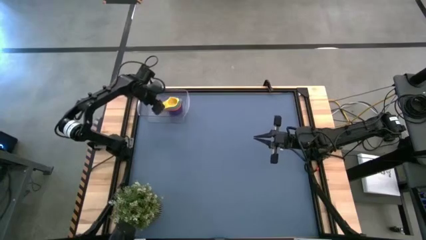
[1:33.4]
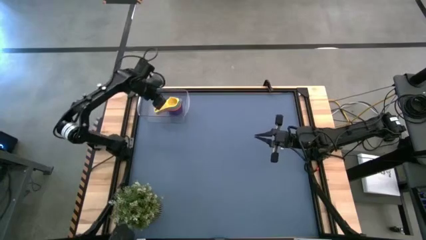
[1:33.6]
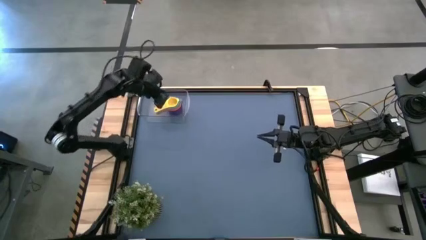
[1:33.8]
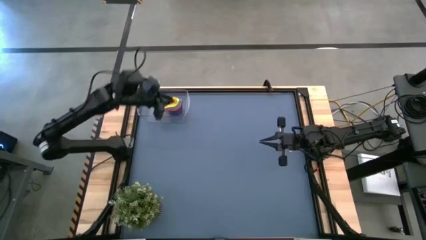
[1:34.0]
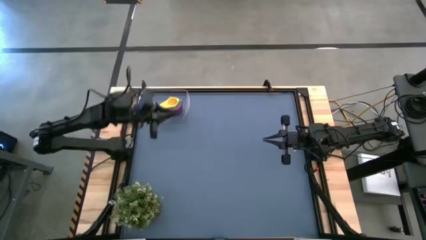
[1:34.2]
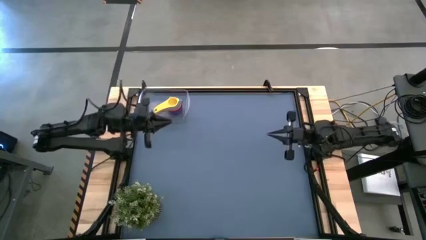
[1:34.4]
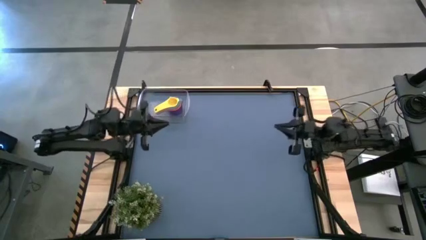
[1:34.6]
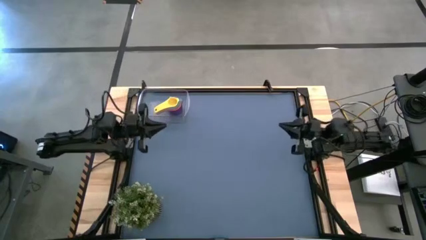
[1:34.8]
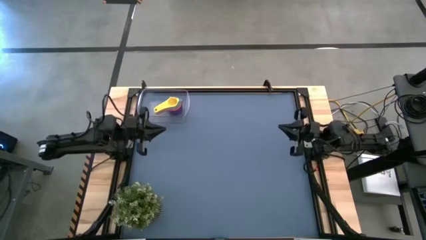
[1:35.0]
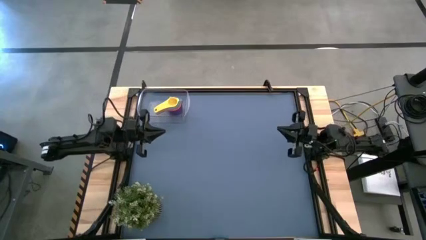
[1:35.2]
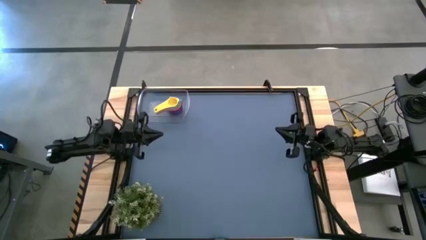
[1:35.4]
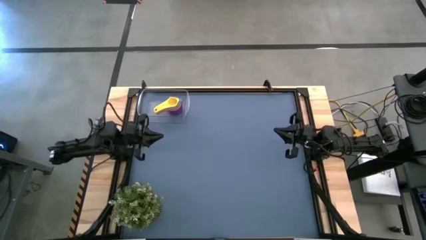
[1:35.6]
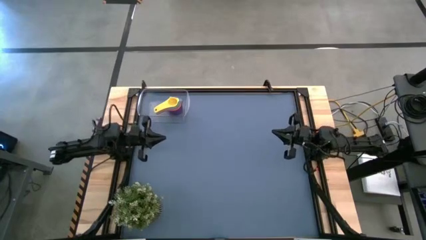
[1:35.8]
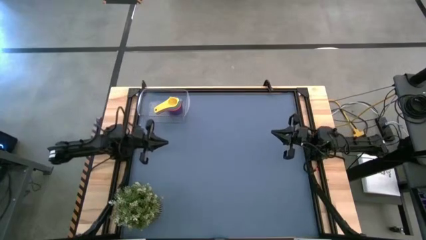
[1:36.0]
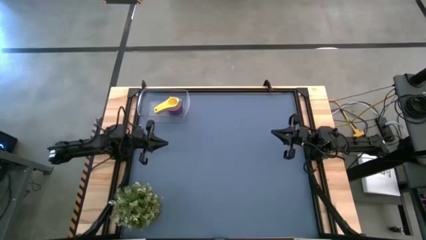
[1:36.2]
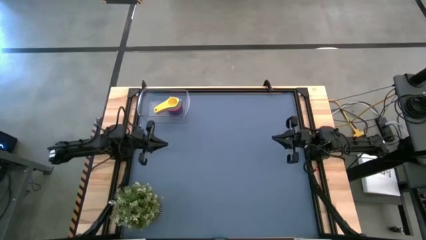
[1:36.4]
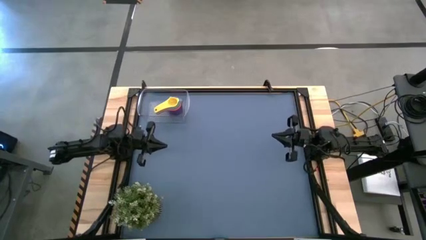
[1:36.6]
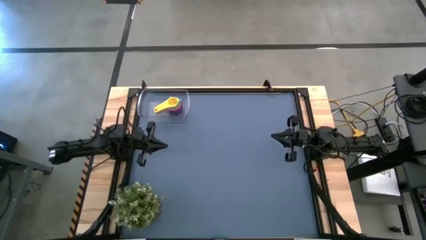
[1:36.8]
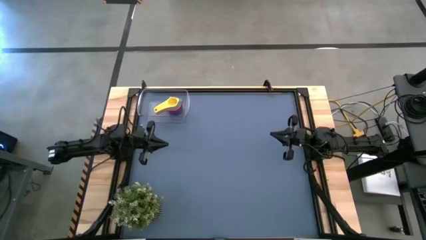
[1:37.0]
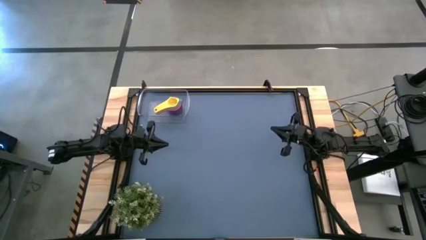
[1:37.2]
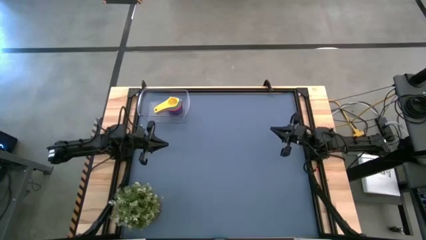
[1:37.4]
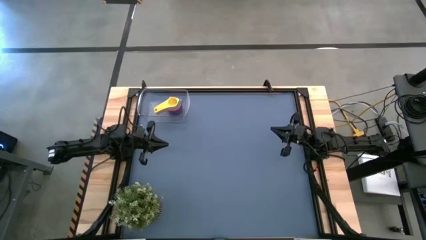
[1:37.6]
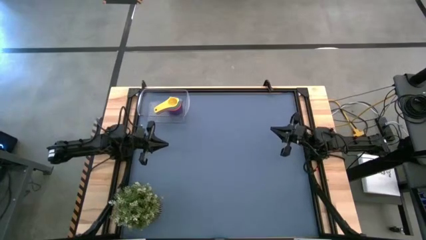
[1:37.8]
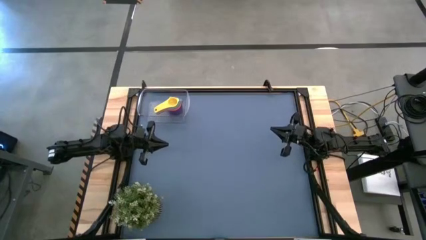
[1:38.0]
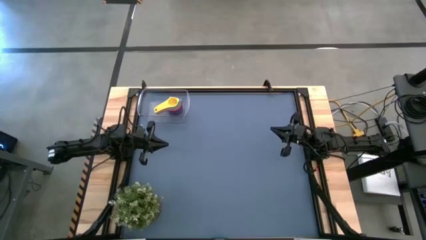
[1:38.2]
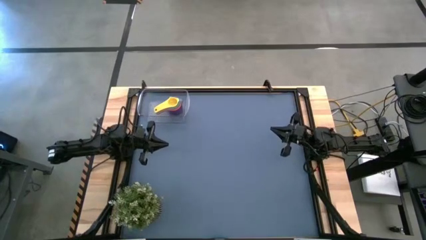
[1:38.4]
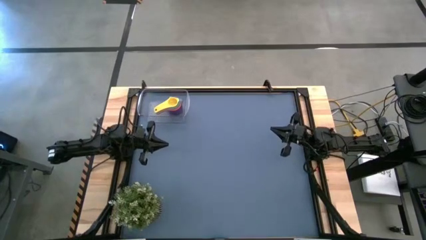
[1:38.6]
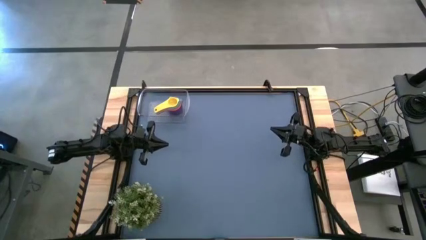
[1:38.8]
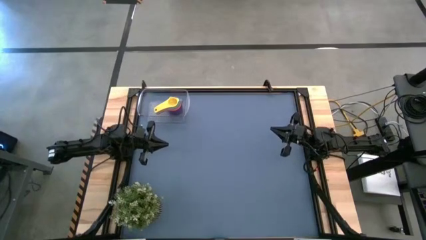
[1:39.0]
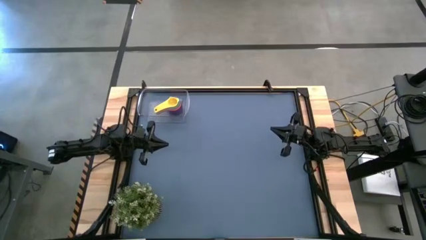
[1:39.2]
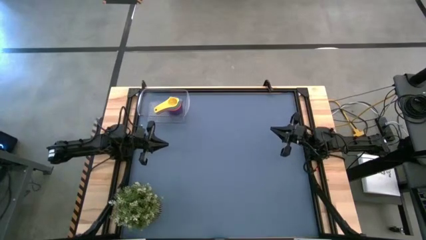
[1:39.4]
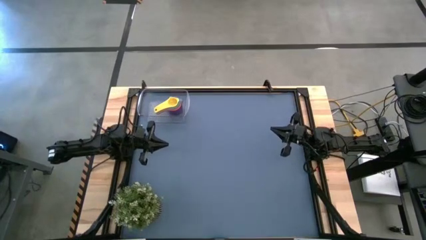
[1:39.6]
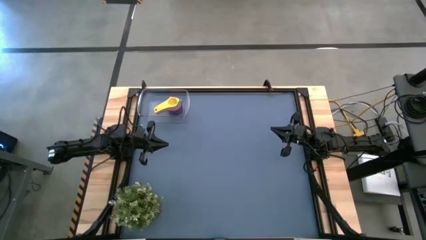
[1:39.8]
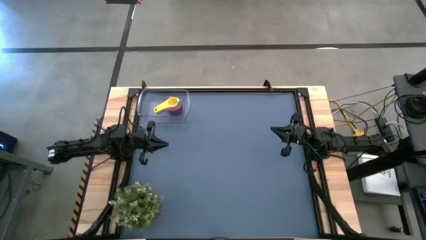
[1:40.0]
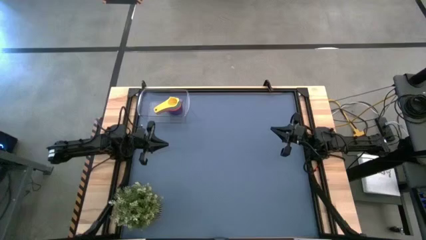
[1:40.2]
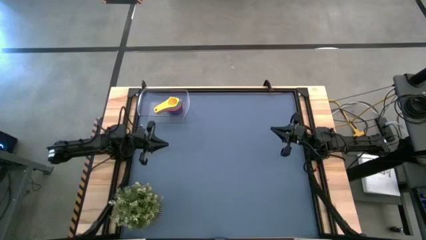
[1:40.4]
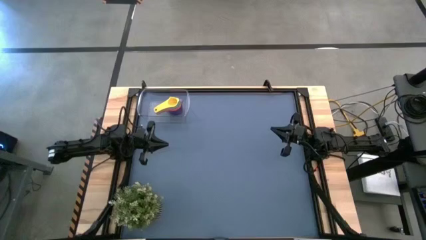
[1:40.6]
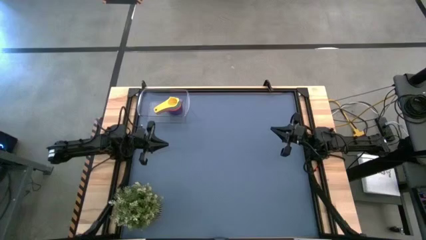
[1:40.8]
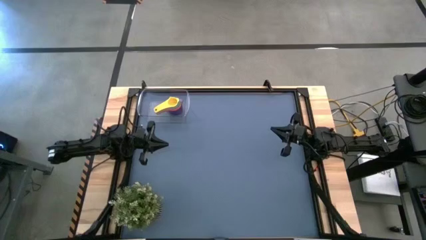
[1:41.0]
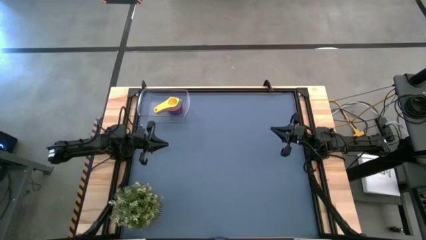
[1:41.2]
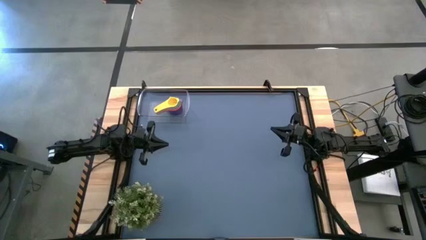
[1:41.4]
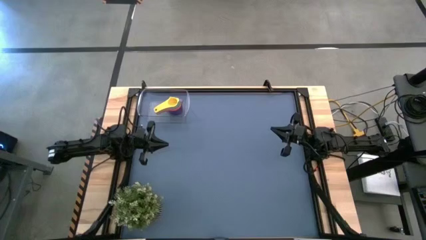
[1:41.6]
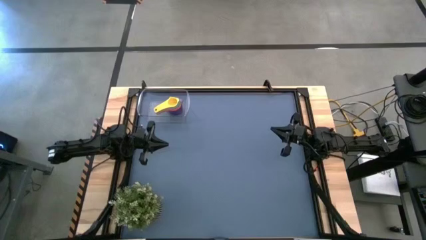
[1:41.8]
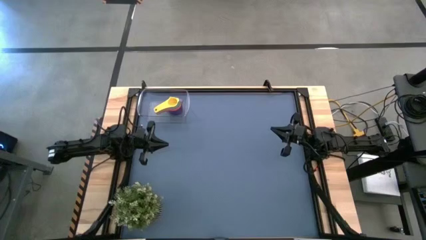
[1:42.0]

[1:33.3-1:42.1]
Task: Nest measuring cups in basket
Return to Home Position

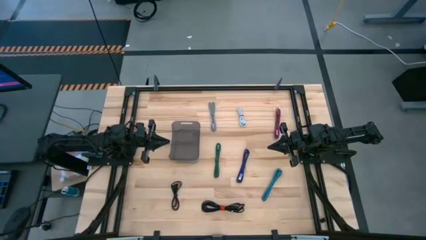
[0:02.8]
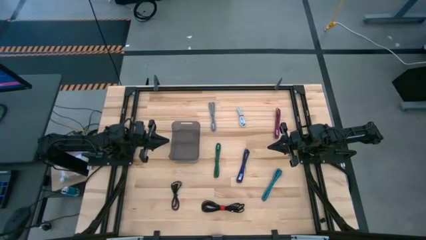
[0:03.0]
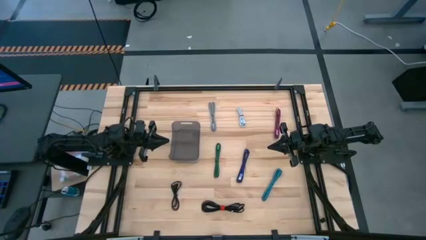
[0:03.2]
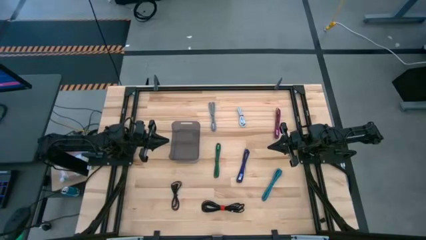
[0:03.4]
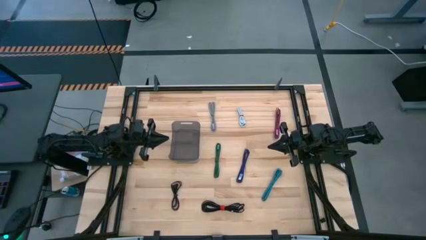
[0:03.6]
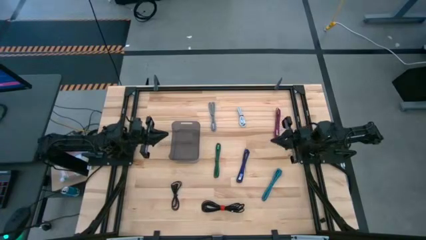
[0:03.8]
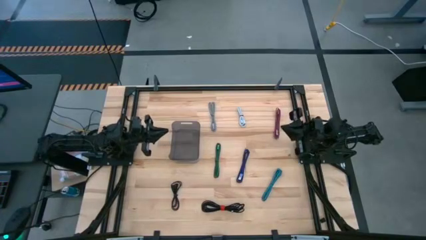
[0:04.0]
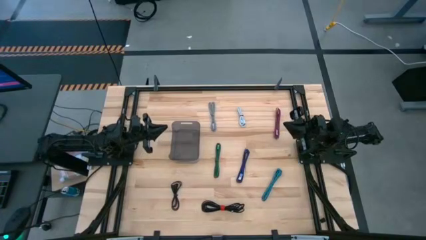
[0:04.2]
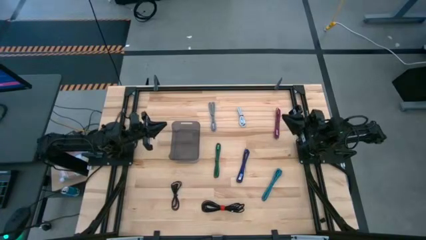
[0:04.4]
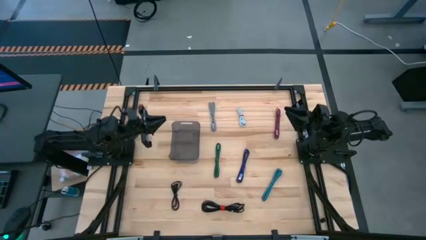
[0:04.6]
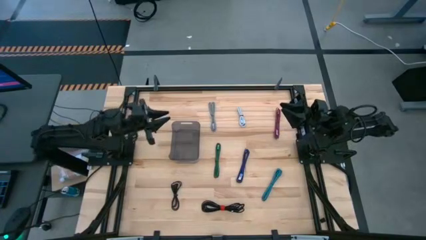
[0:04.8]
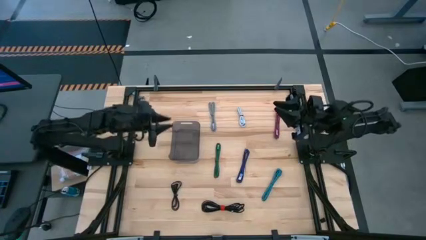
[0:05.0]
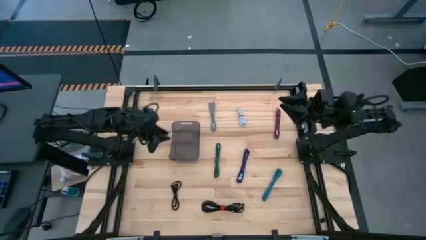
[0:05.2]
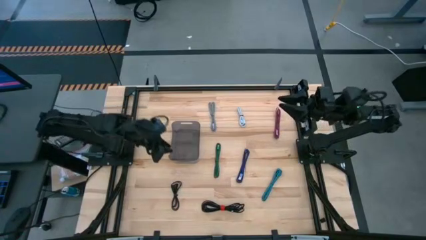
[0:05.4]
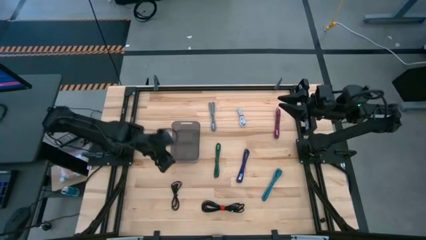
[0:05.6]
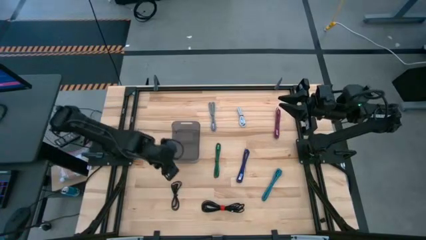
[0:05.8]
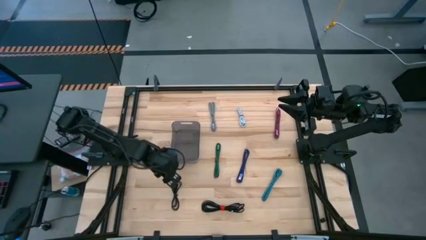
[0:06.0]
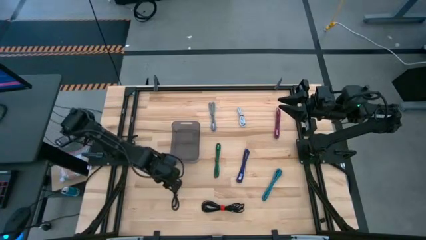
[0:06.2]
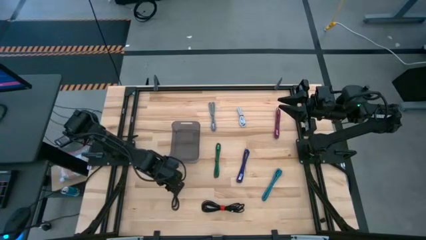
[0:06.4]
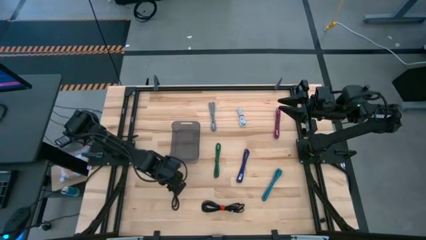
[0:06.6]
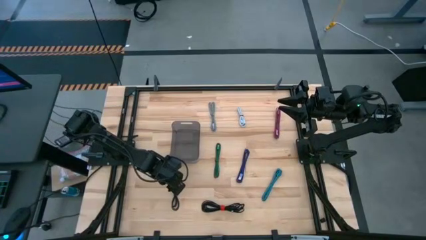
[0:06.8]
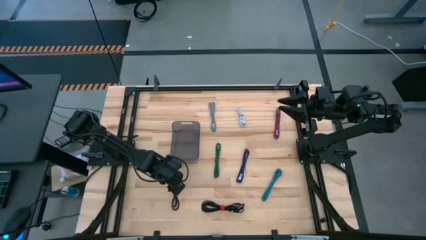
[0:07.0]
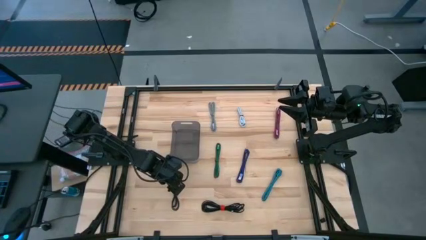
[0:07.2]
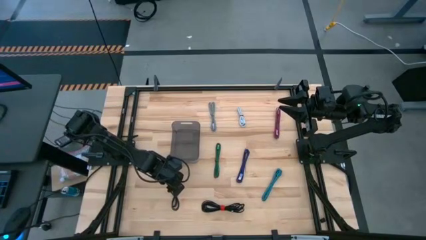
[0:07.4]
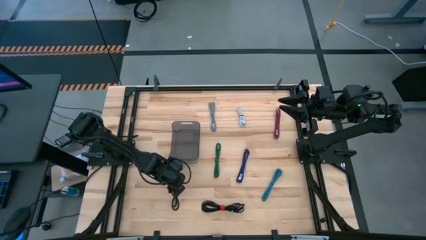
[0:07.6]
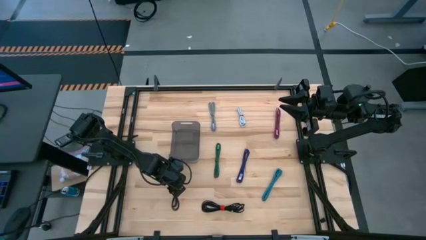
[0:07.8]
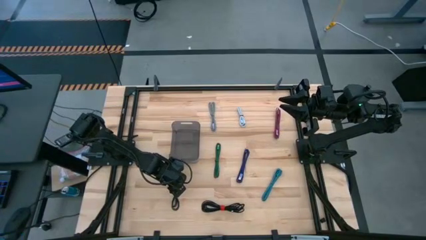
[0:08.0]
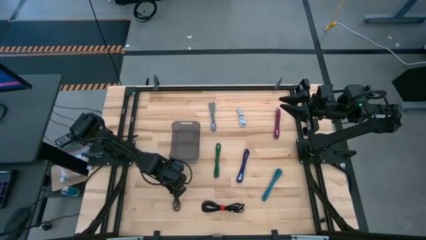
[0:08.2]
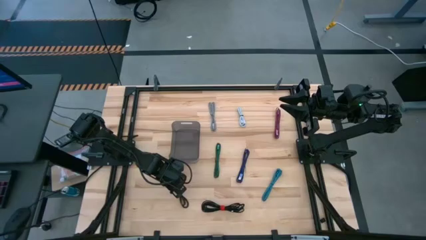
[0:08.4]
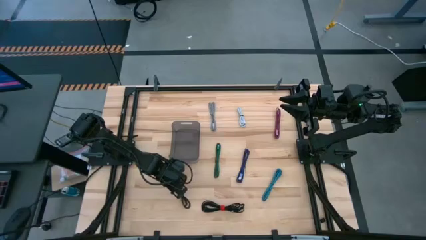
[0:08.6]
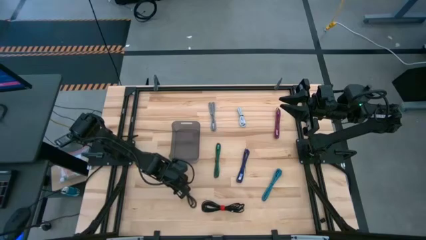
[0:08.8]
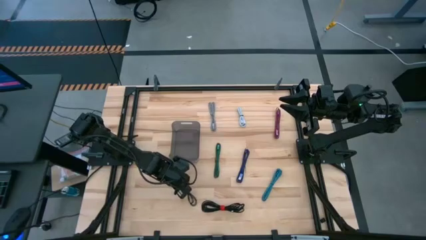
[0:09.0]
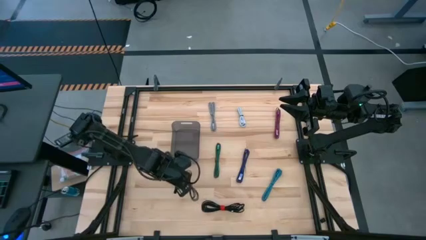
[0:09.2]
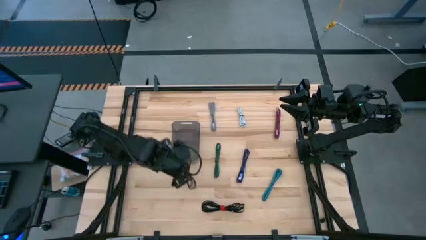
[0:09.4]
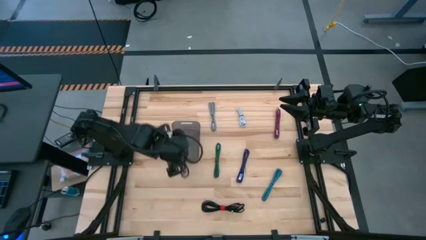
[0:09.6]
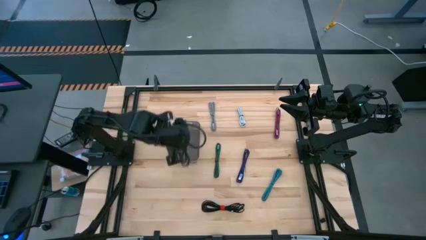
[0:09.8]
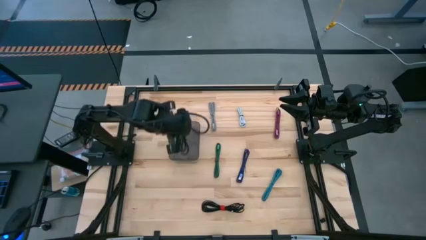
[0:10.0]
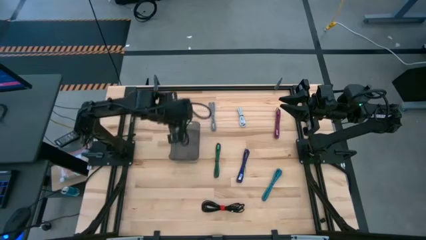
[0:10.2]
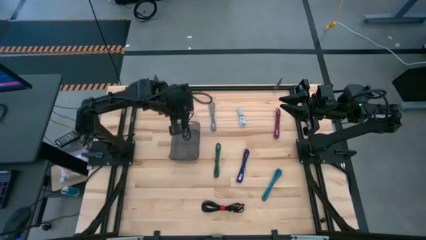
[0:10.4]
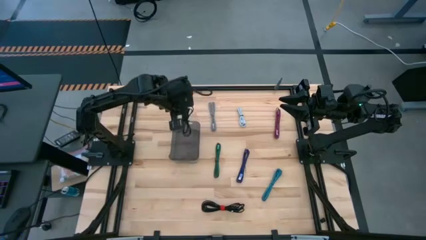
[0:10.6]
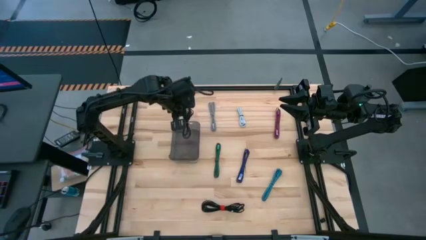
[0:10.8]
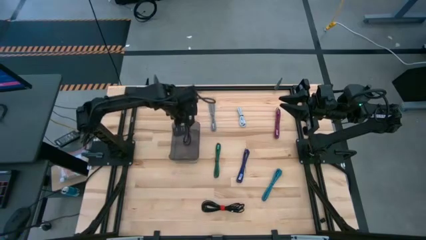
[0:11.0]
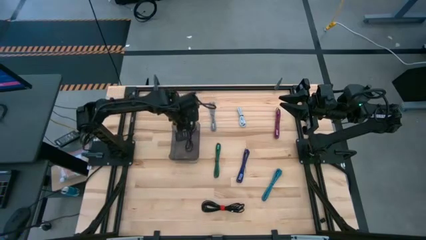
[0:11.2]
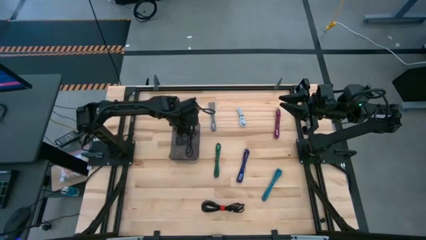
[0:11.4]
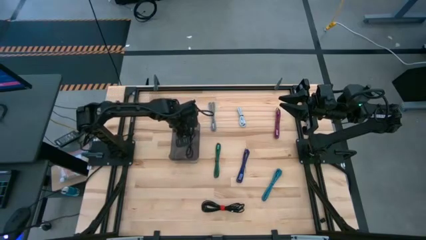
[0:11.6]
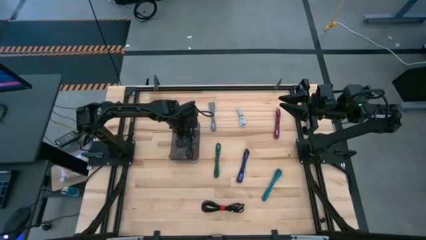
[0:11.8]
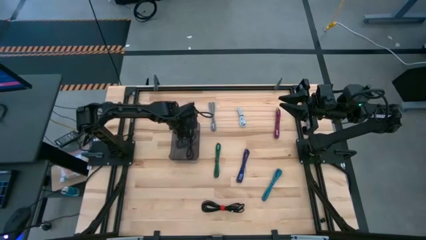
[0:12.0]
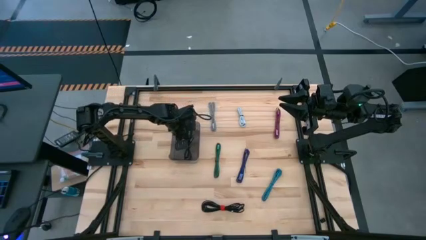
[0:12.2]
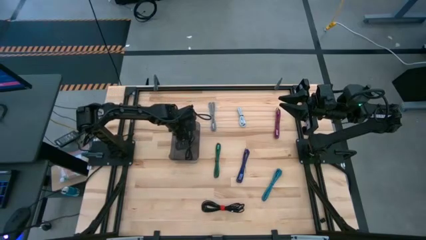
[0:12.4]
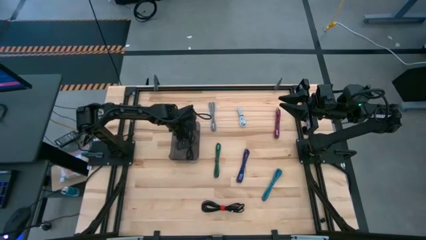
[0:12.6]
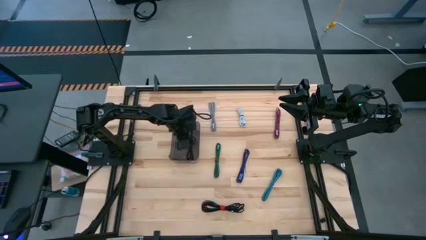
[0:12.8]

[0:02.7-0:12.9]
Task: Pick and place USB-C Cables
Put the black USB cable into the black bin
